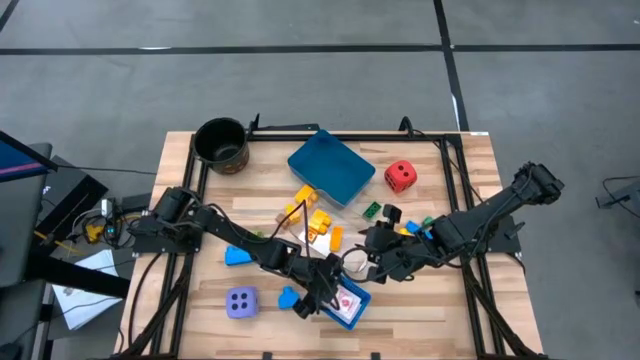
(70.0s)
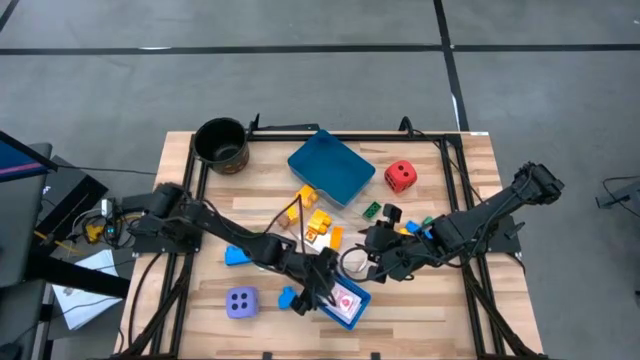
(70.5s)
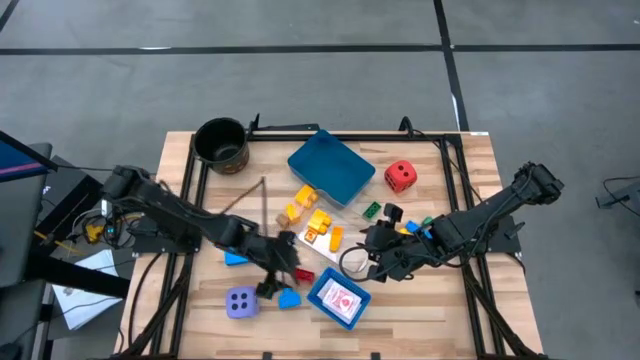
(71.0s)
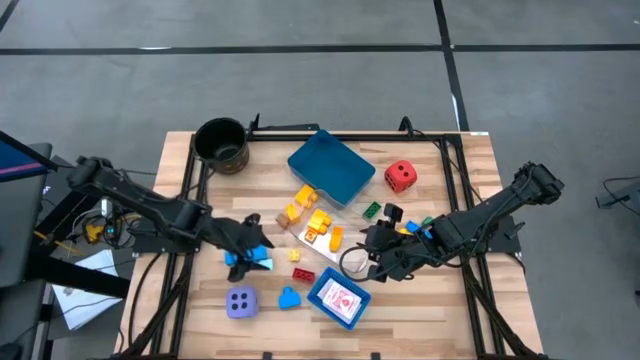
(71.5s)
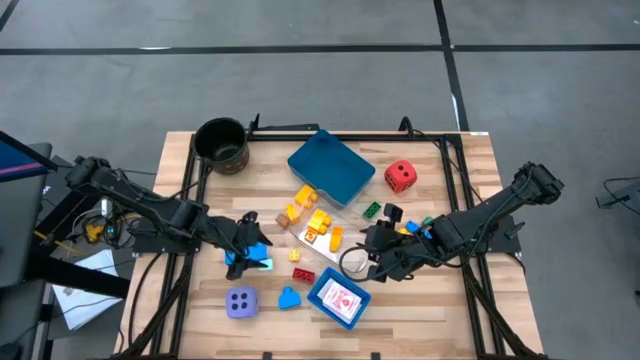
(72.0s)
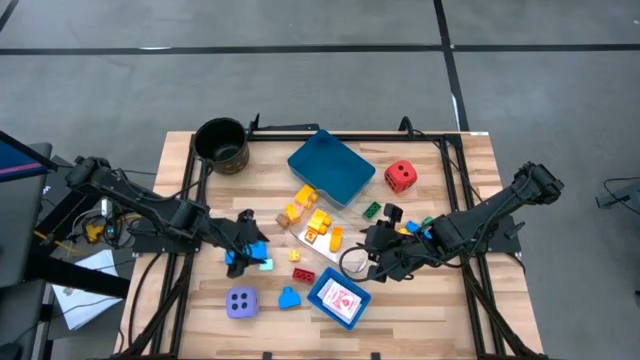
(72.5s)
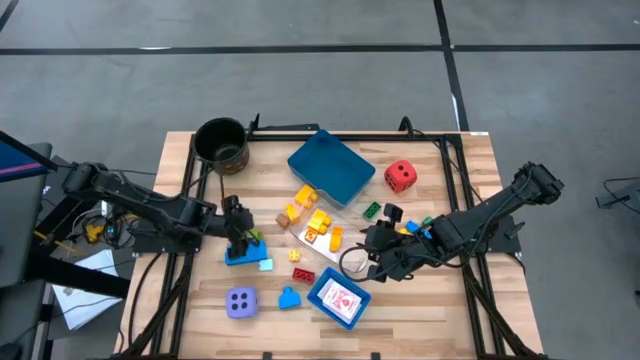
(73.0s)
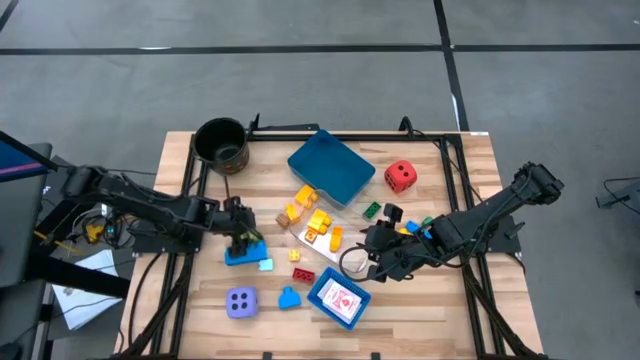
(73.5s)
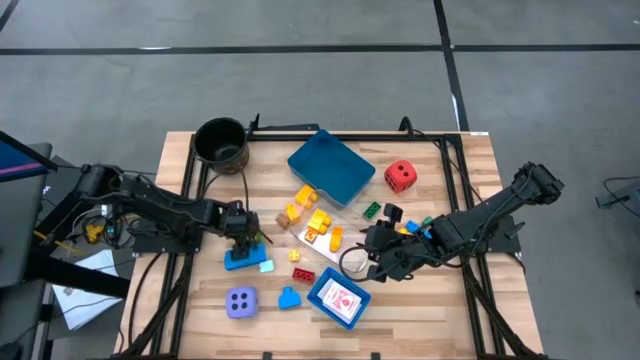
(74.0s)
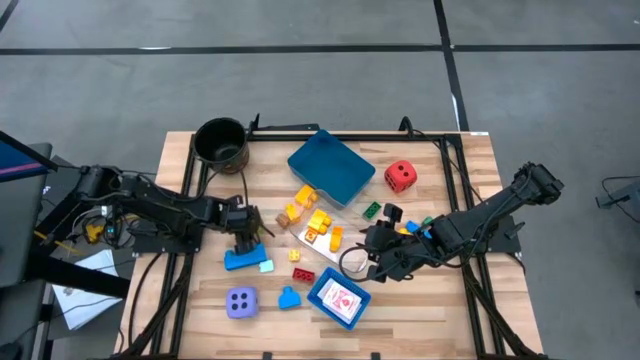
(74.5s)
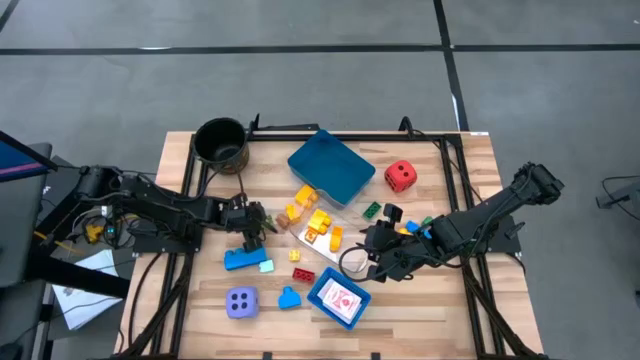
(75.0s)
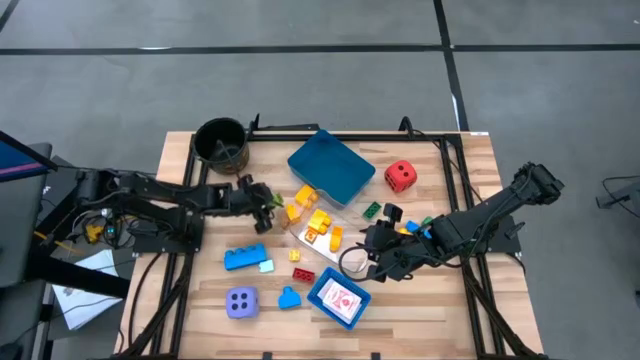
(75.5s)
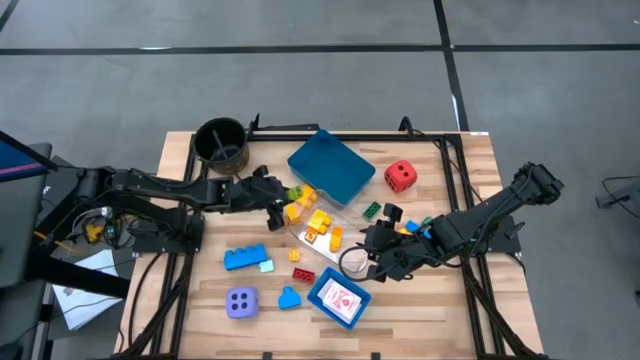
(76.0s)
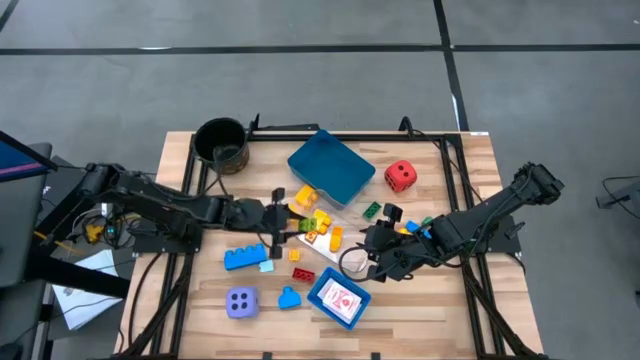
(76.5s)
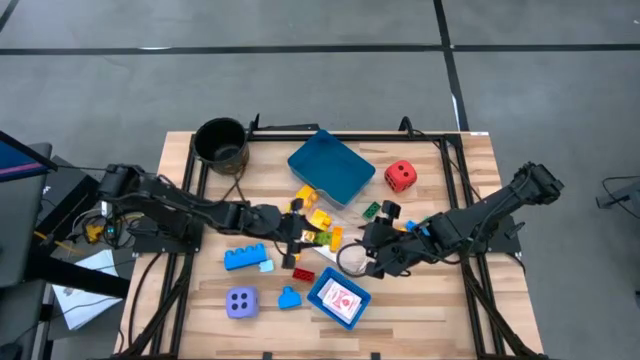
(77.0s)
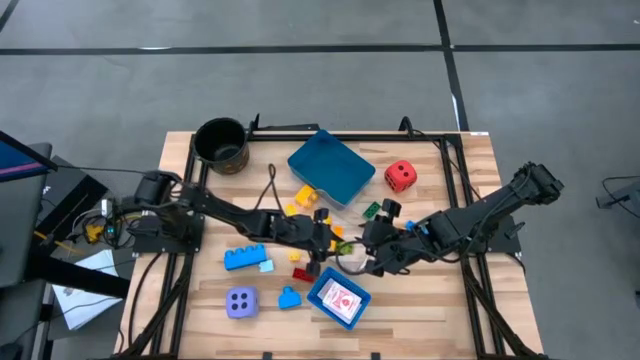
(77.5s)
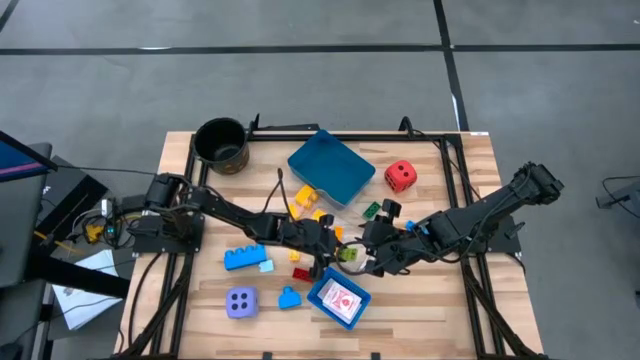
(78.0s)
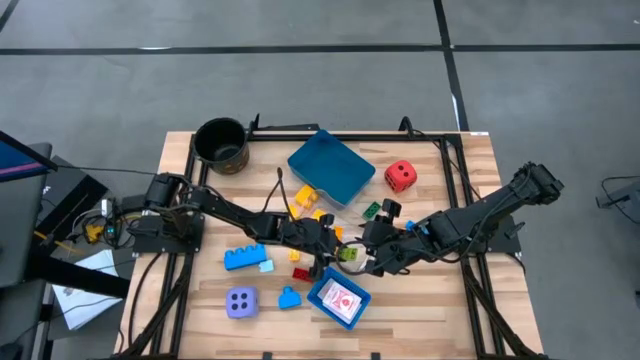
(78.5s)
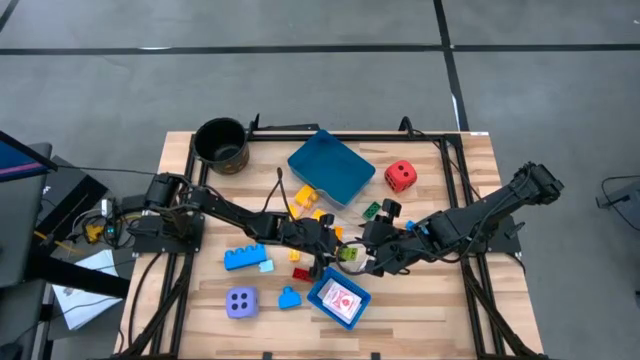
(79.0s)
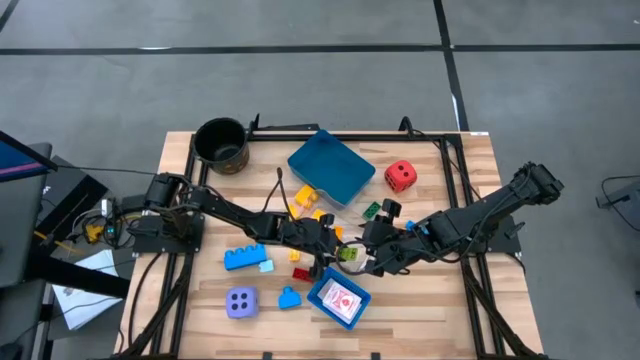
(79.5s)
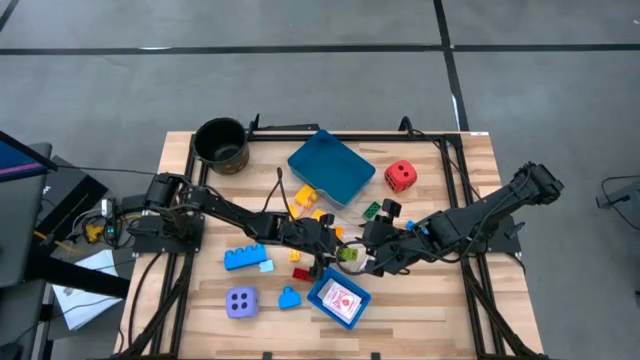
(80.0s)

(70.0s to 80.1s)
Task: Pick & Place Toys
Put the yellow and green game piece block into the transparent bin

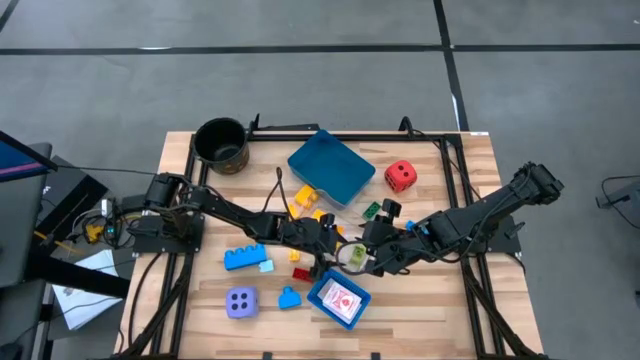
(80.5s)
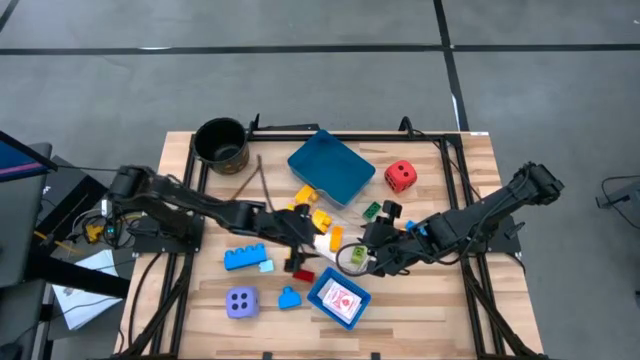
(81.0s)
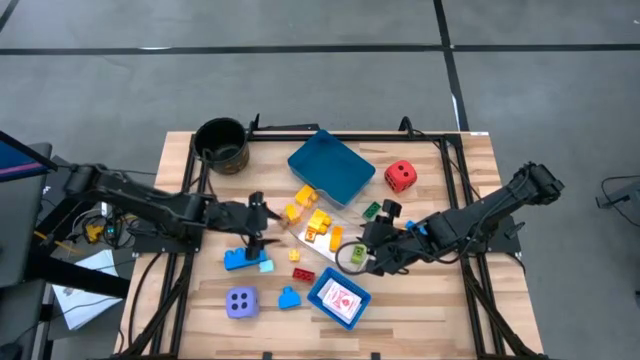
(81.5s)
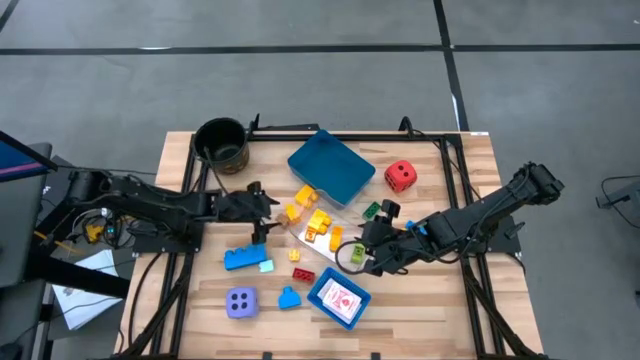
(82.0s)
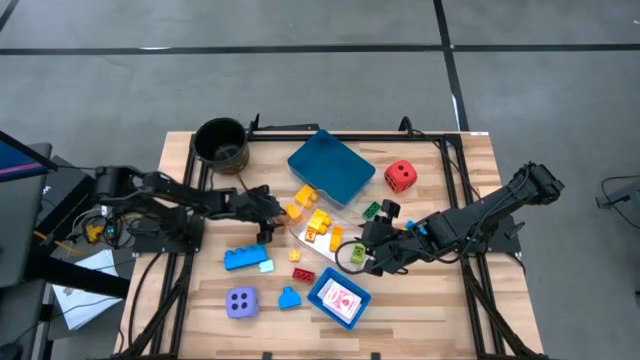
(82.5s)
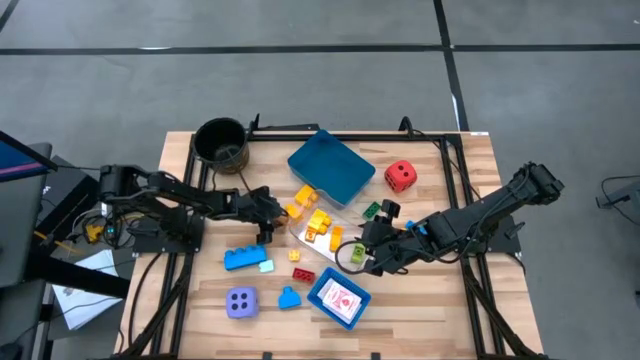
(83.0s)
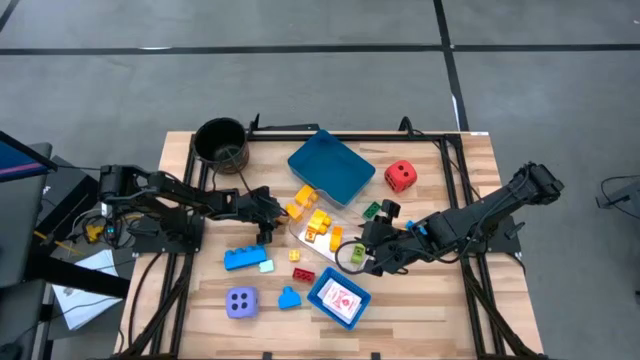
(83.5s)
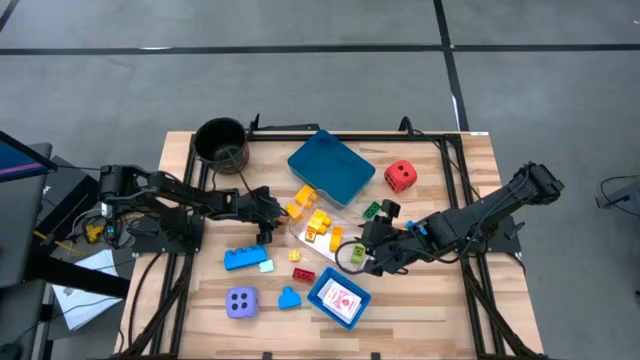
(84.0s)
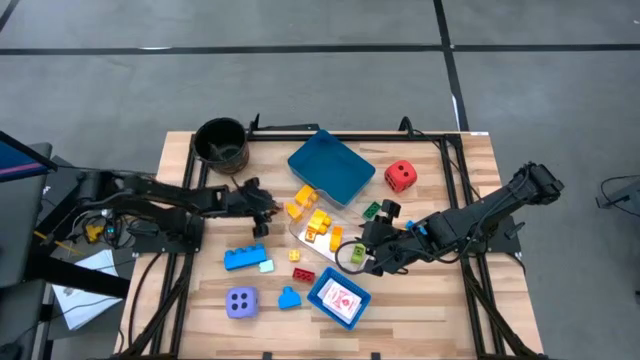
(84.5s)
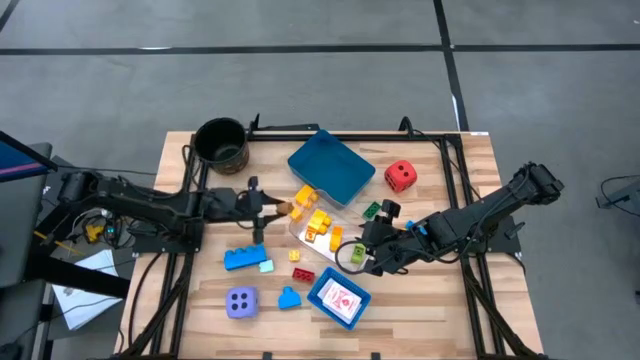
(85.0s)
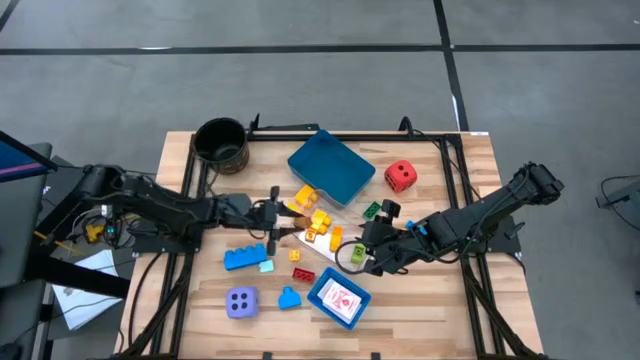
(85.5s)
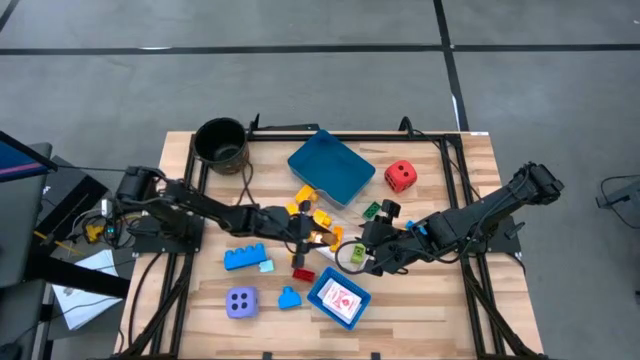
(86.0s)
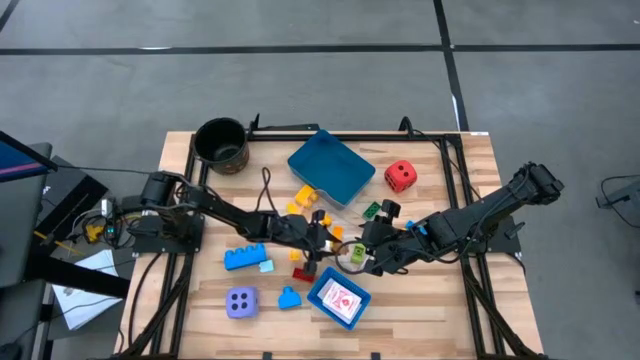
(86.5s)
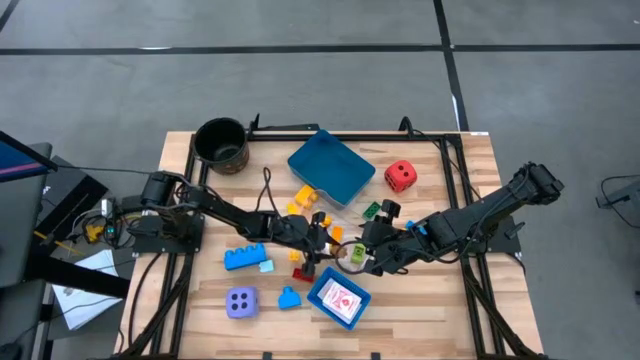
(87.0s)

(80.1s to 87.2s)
Put the brown game piece block into the transparent bin

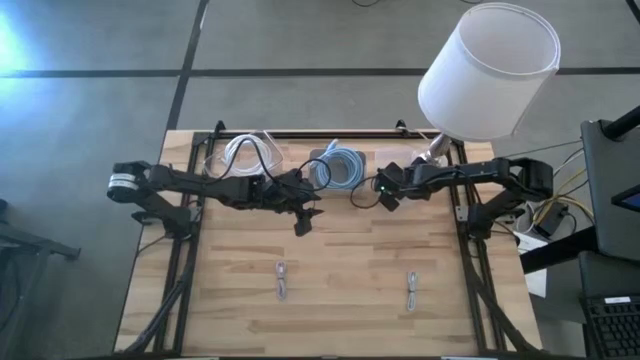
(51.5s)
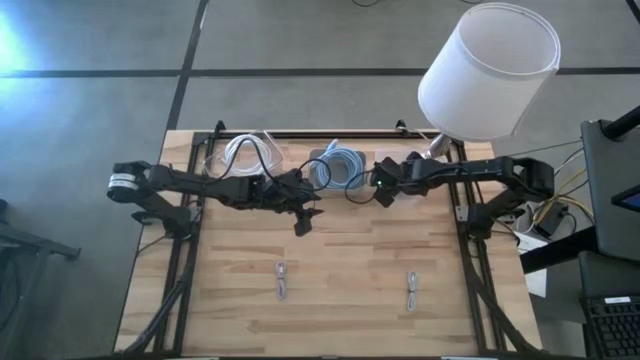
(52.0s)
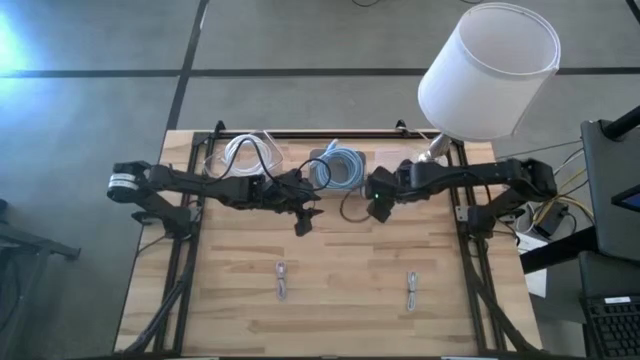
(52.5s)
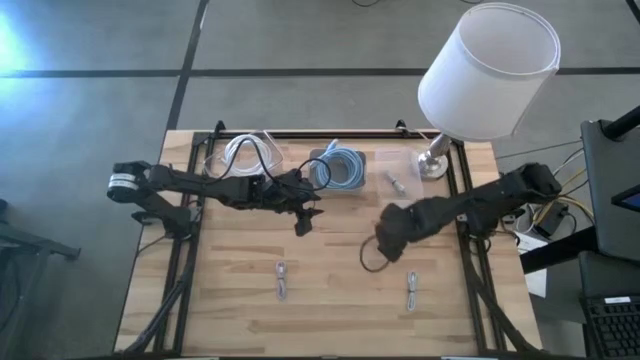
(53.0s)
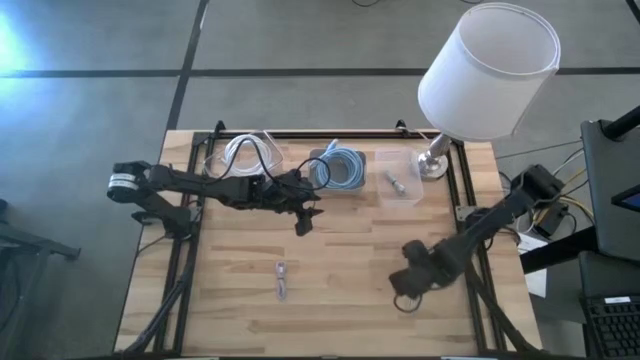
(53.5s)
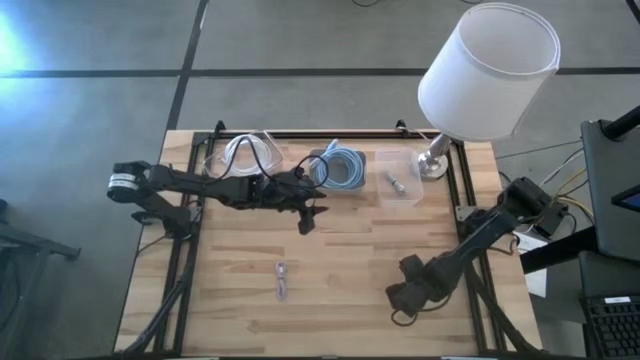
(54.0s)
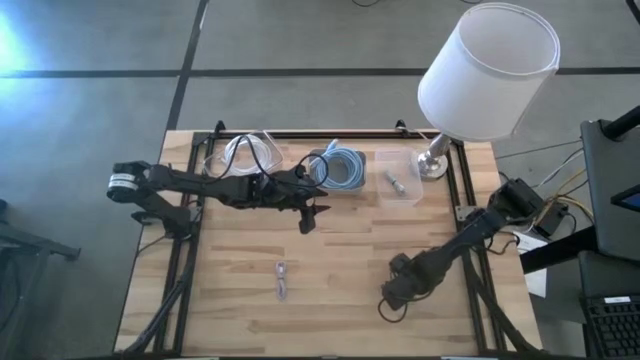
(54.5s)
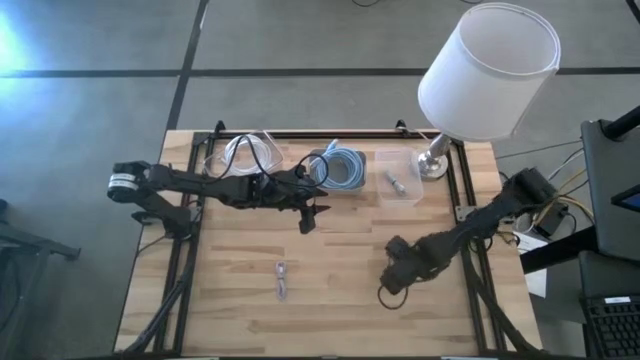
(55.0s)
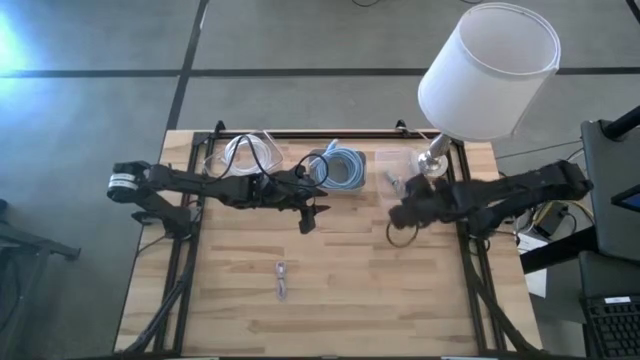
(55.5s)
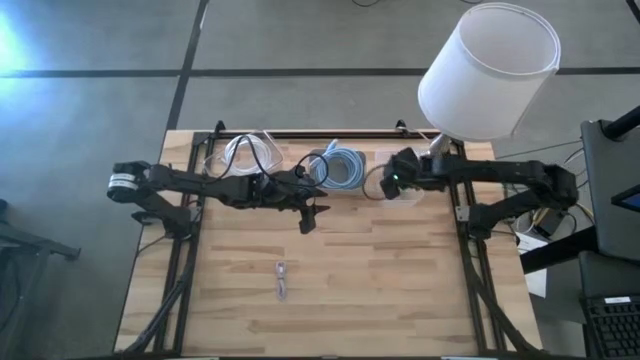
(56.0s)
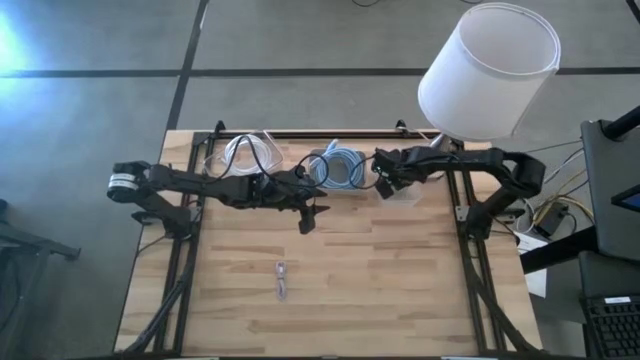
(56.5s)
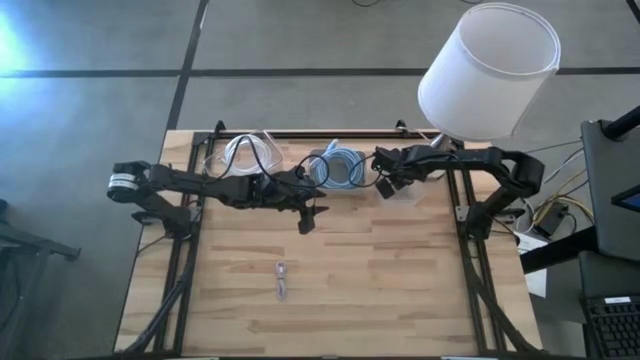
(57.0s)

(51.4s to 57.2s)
Task: Pick & Place USB Port
Put the small white charger cable into the right transparent bin
